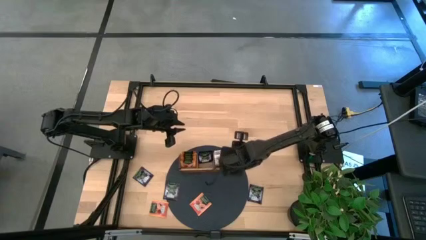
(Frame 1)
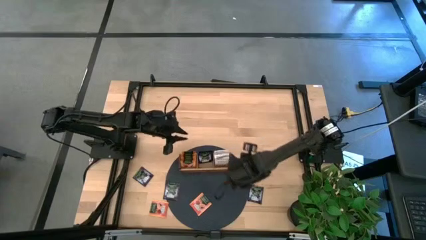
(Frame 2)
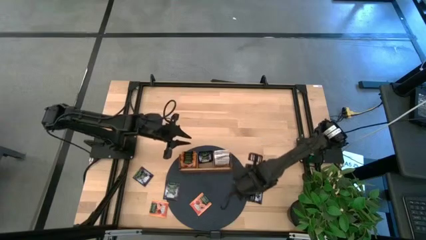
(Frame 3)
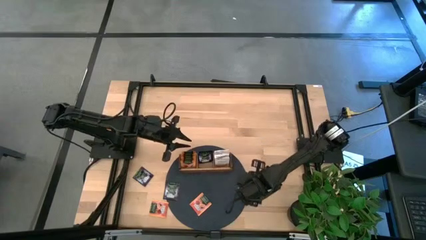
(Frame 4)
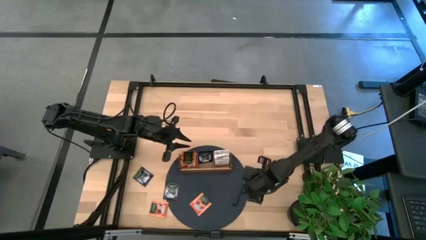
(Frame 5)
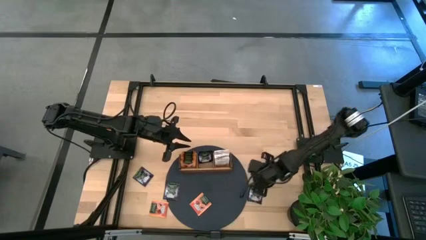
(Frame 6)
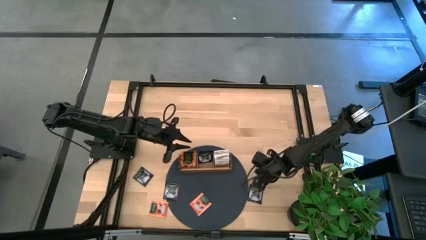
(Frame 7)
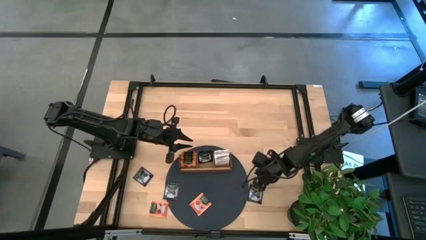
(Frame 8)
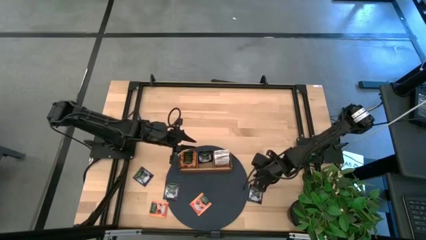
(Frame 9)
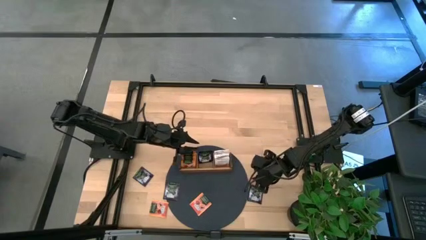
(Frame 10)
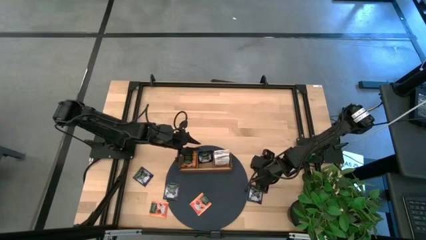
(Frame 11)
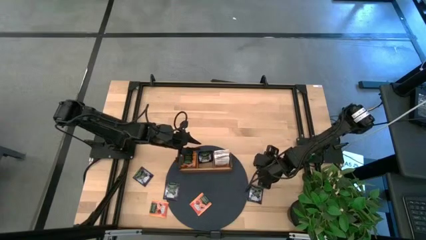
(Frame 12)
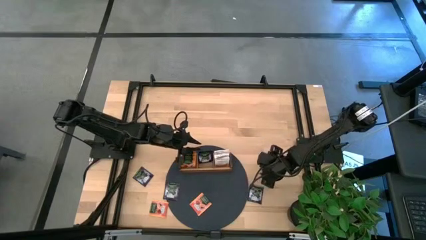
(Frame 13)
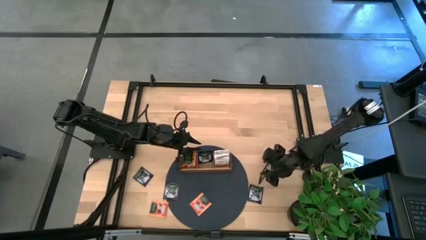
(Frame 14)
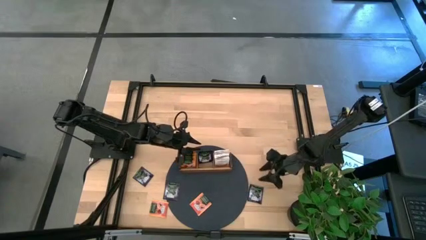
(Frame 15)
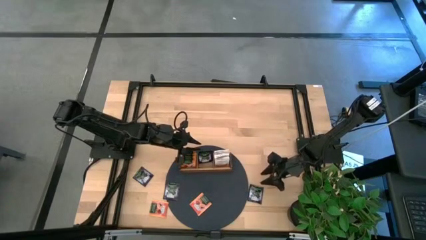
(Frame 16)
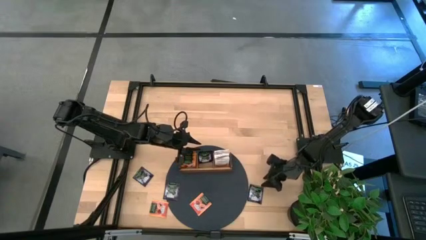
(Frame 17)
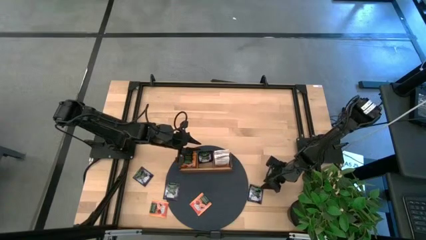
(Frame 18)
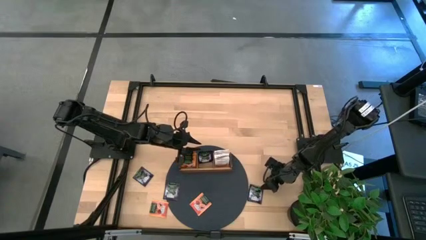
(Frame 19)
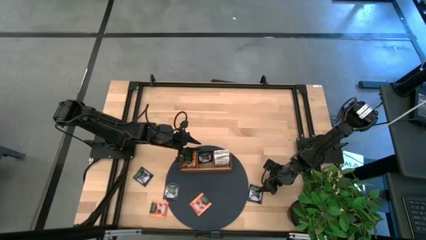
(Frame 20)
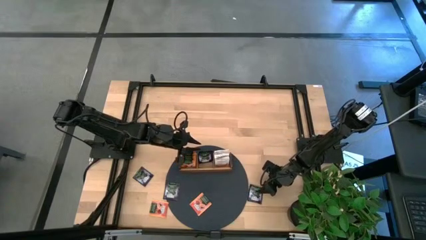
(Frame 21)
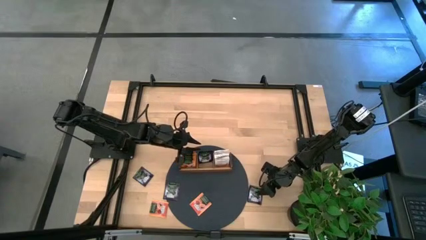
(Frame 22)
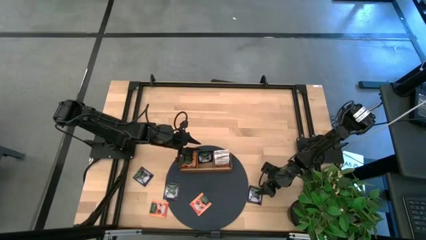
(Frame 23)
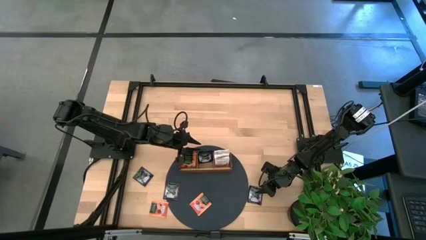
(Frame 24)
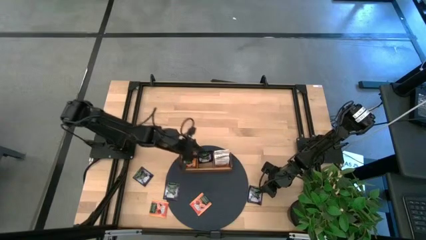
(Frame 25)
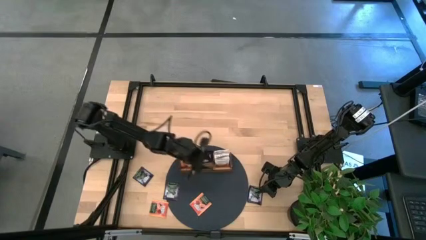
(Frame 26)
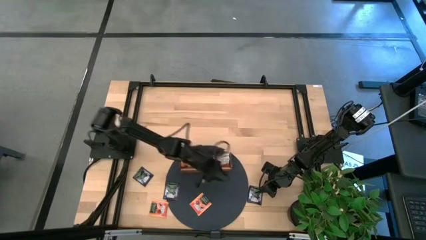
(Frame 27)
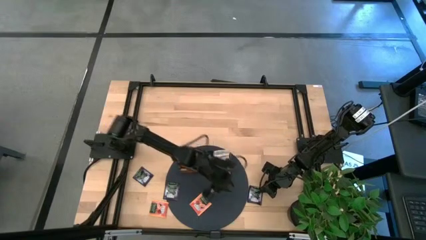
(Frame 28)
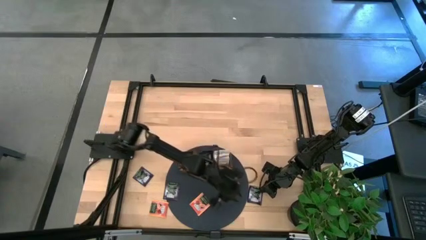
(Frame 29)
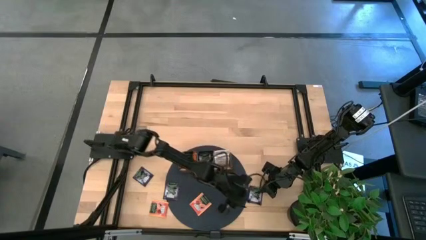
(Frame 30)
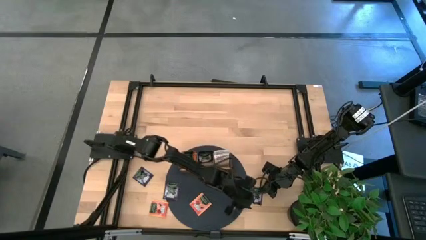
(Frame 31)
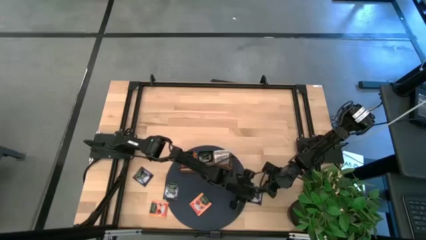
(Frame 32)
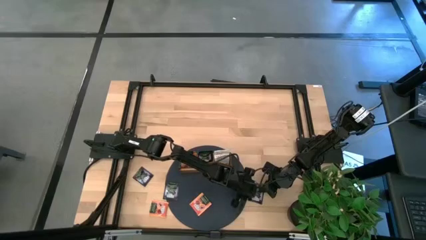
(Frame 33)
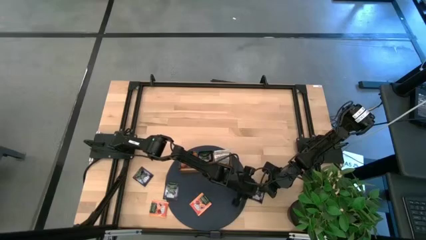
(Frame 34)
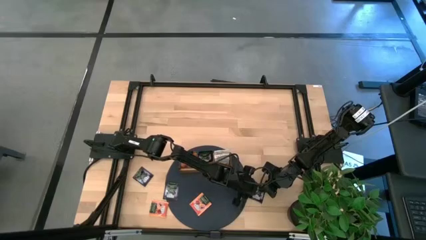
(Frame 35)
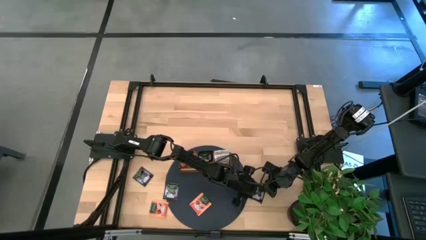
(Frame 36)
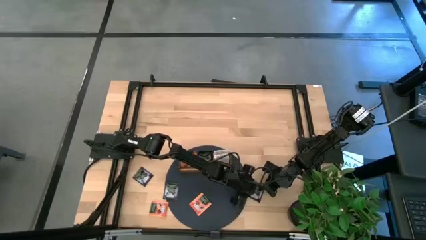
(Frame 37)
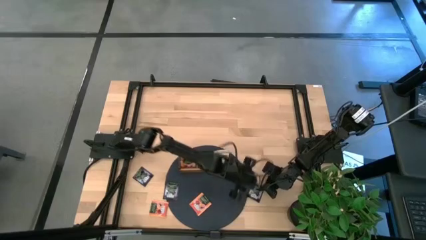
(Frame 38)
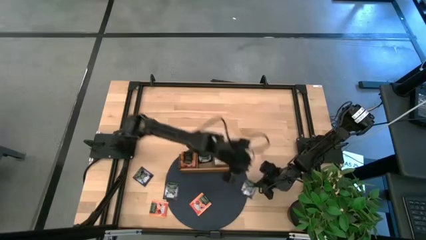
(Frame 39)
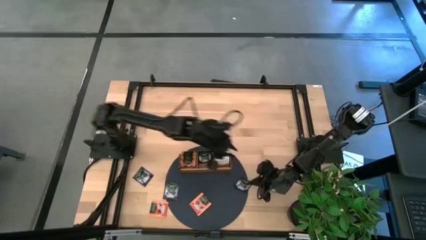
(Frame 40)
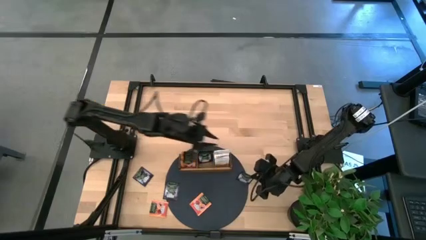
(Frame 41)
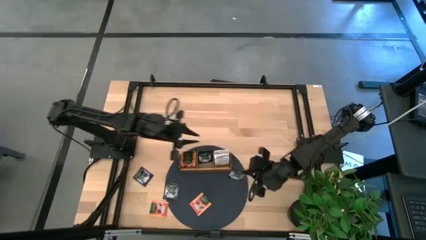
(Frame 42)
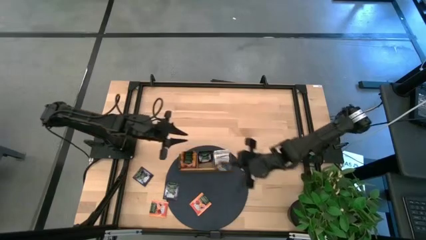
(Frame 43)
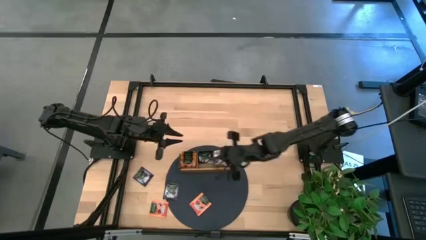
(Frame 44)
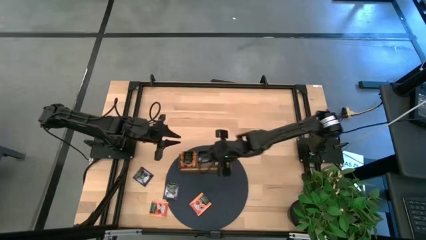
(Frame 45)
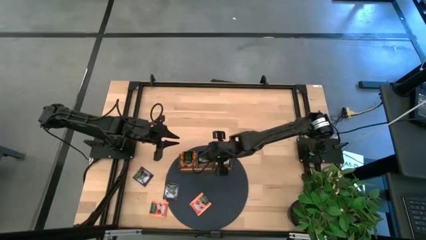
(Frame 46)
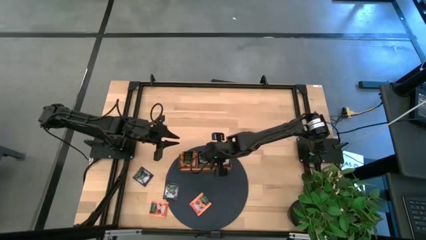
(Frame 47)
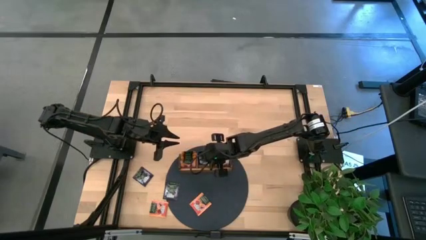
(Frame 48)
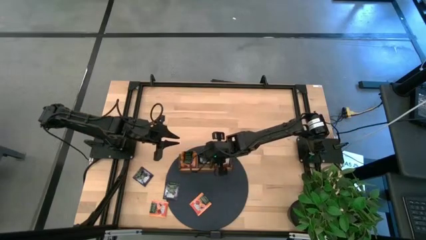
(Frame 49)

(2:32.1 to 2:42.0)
Task: Pick & Place Tea
Put the black tea bag into the middle section of the wooden organizer

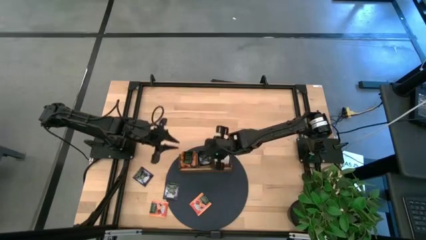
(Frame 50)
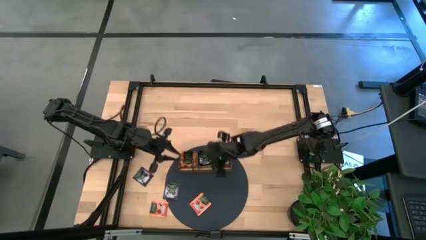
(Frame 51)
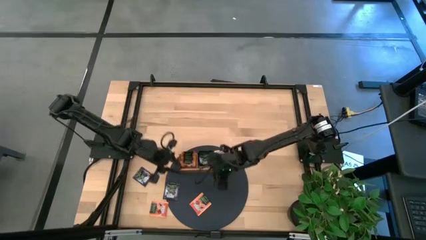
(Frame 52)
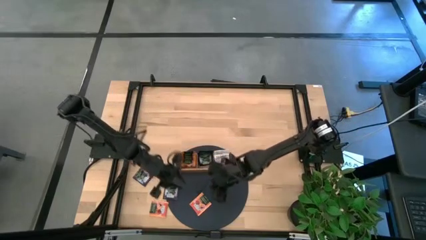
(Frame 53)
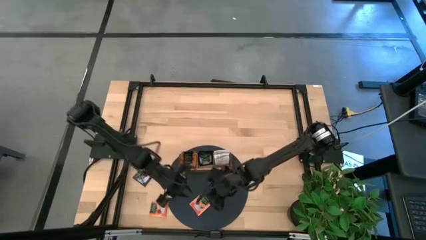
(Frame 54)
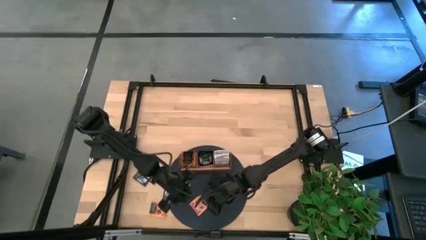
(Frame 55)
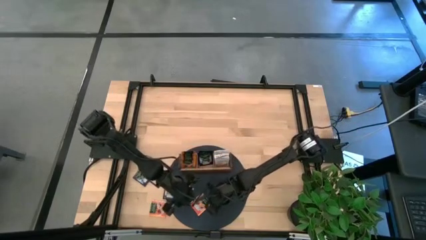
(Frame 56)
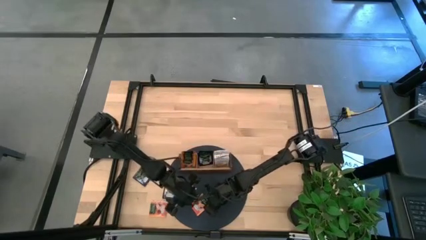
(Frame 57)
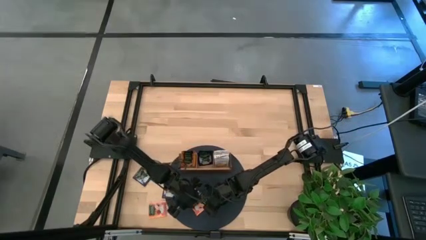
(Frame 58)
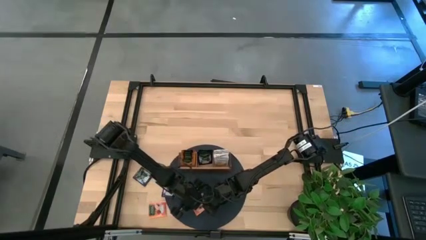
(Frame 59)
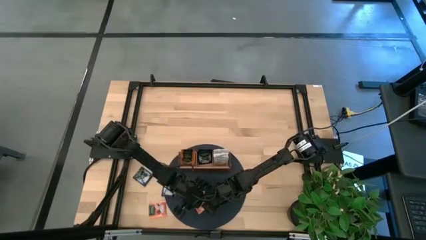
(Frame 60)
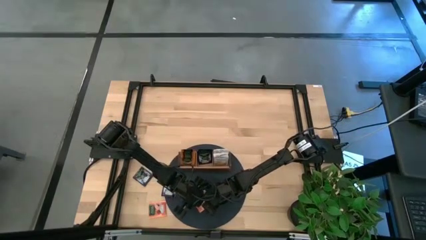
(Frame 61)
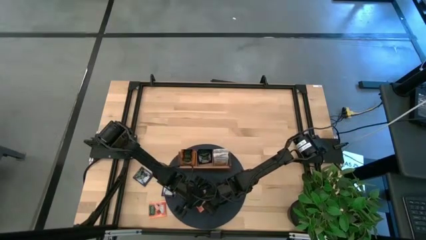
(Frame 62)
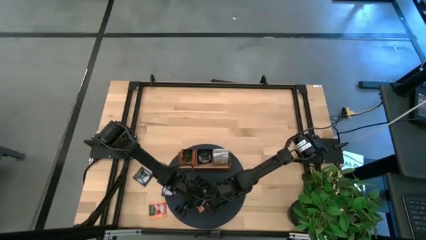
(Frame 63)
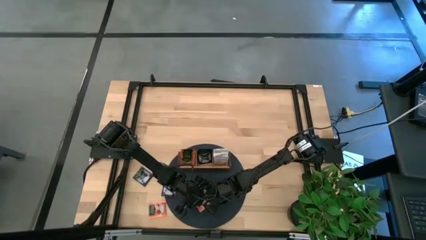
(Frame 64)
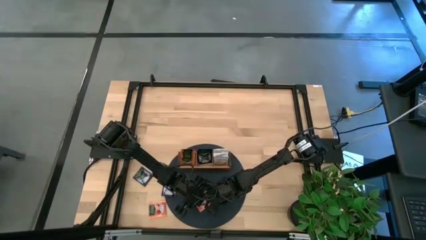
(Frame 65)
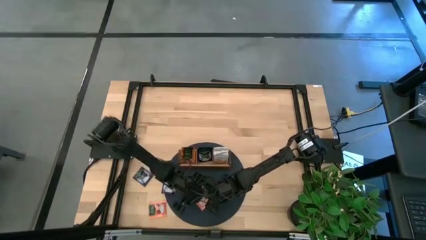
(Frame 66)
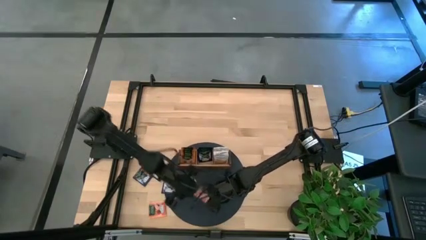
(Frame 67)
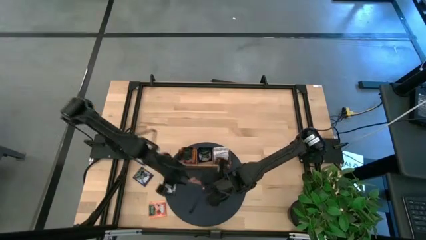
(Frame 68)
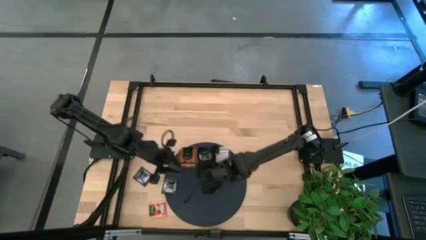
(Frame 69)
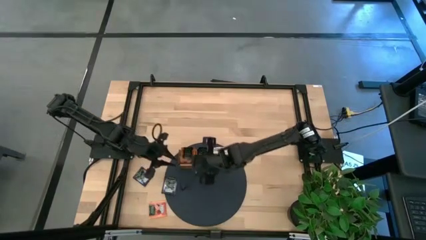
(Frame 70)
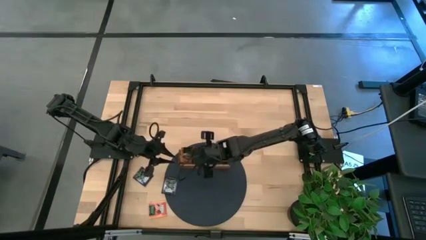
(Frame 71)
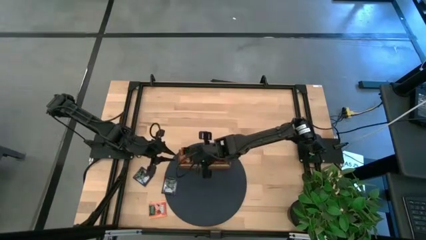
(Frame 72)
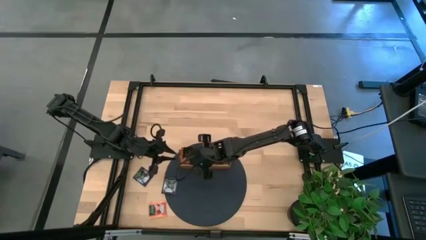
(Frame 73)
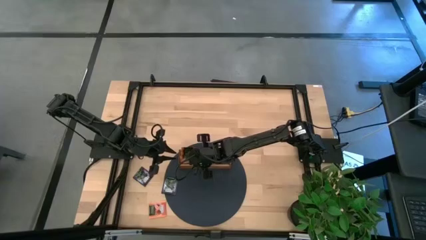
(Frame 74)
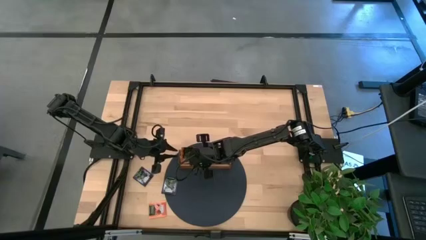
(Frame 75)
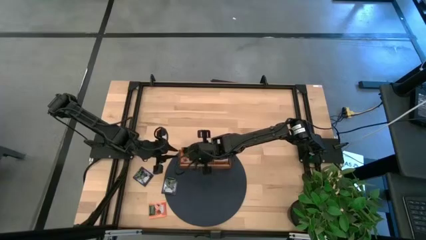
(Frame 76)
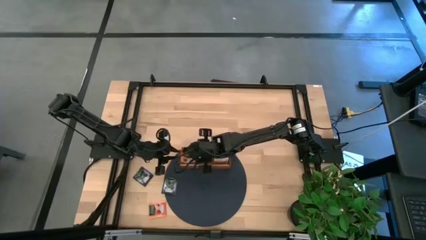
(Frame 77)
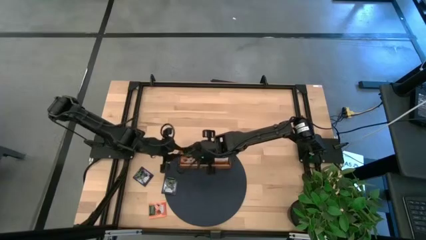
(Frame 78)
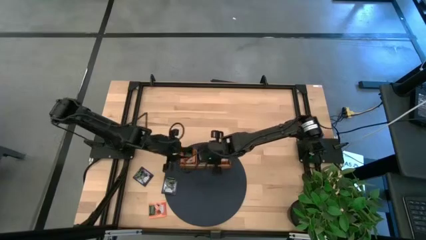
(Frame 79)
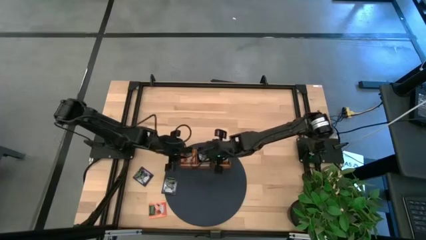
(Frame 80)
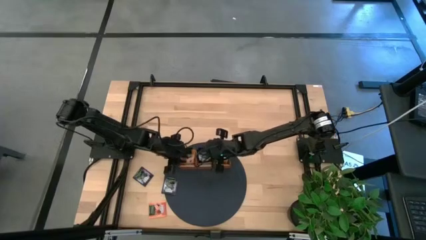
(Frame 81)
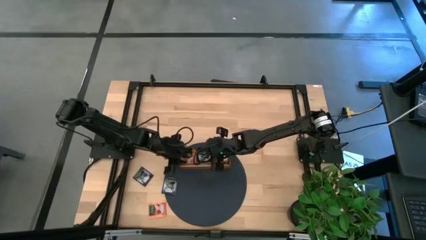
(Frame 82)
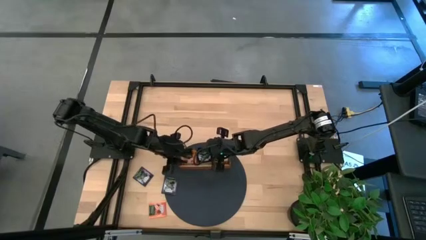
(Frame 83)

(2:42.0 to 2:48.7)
Put the orange tea bag into the left section of the wooden organizer

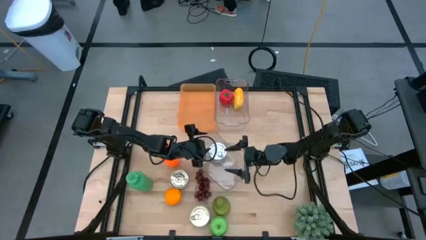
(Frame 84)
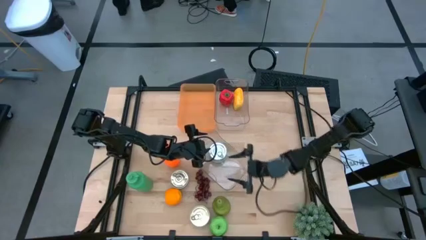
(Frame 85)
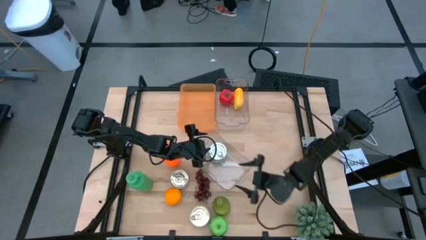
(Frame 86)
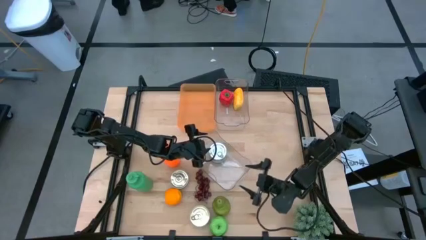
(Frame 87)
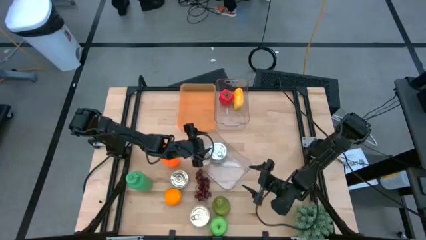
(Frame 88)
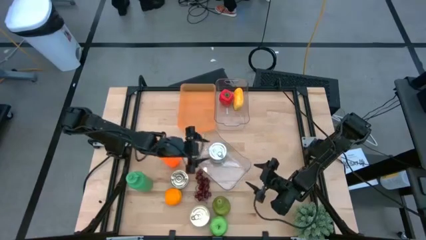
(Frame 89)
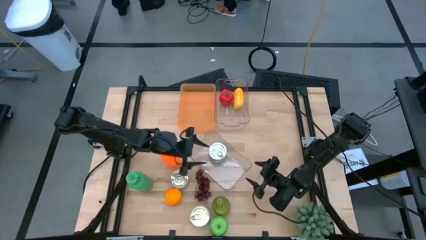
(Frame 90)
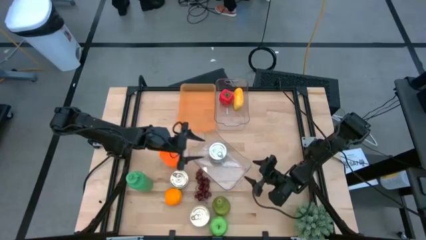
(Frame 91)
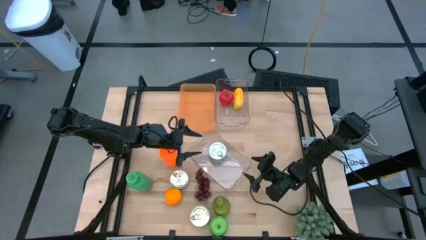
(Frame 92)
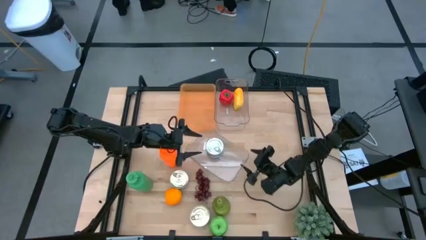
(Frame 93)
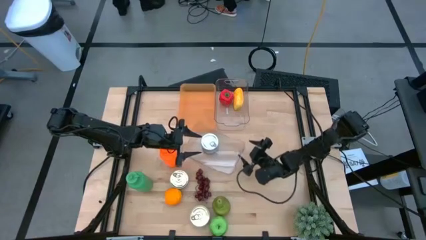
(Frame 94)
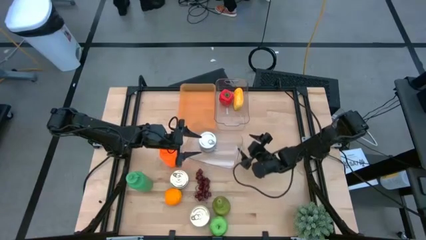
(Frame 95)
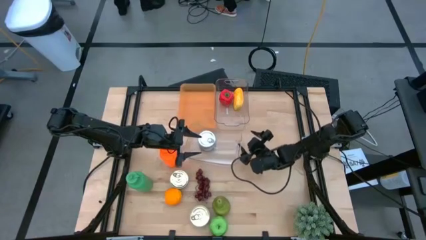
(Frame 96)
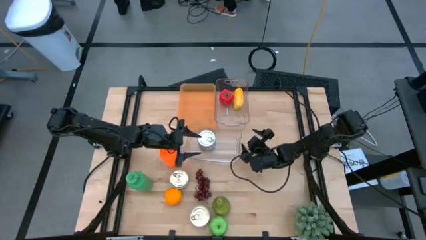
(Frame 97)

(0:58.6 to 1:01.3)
Task: Pick & Place Food Item
Adjust the bottom transparent bin on the table
